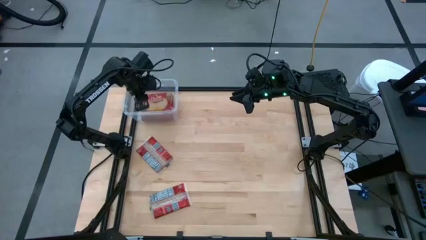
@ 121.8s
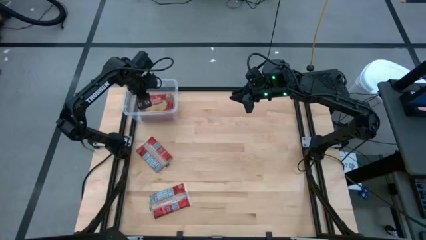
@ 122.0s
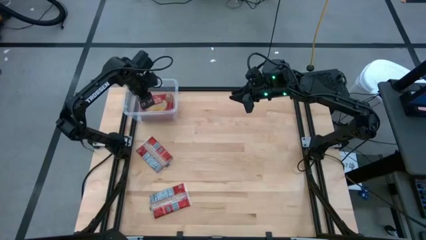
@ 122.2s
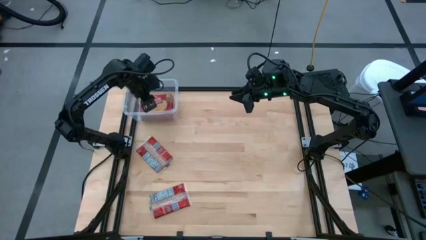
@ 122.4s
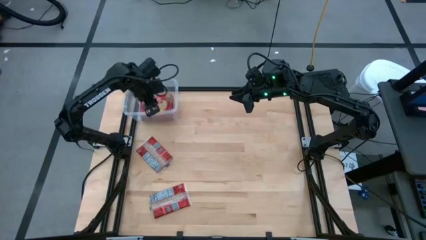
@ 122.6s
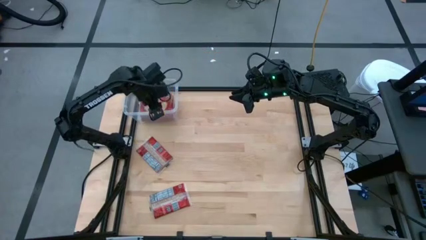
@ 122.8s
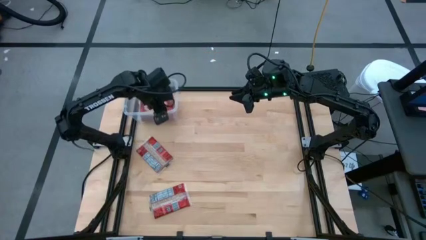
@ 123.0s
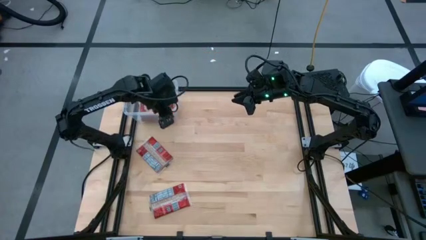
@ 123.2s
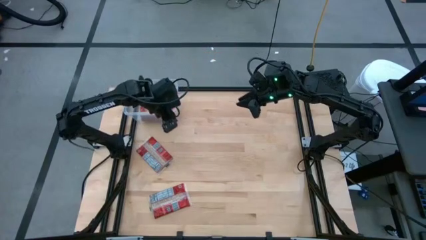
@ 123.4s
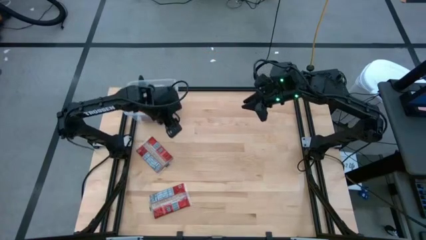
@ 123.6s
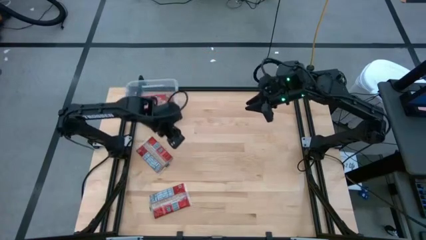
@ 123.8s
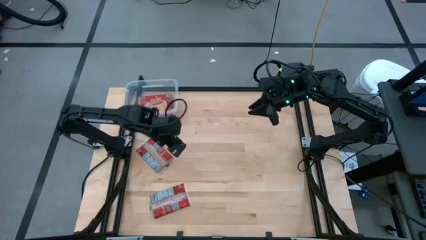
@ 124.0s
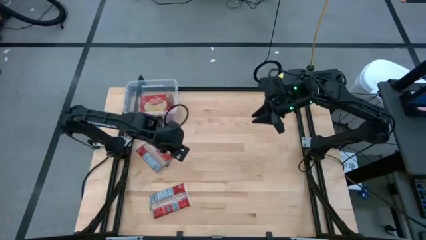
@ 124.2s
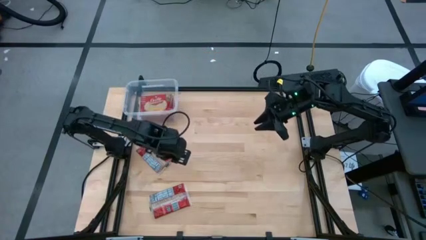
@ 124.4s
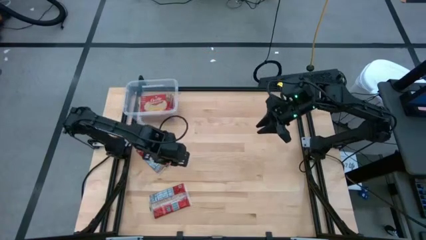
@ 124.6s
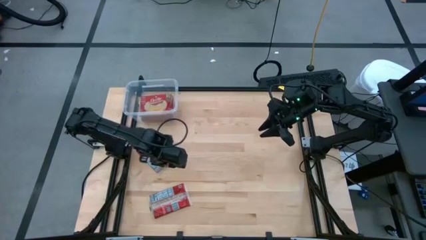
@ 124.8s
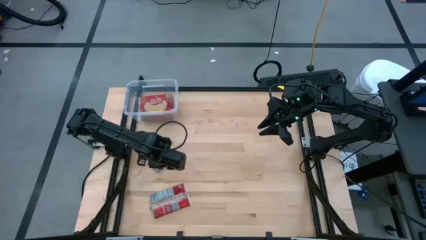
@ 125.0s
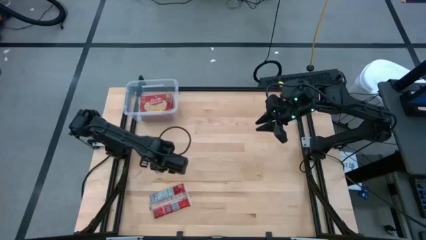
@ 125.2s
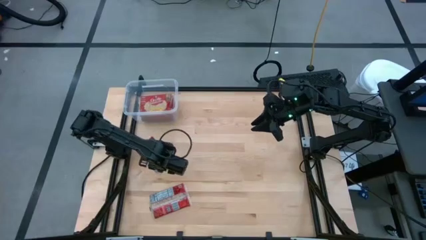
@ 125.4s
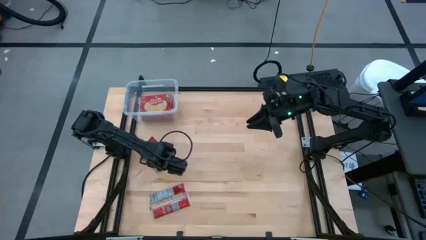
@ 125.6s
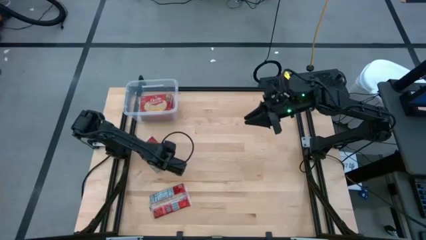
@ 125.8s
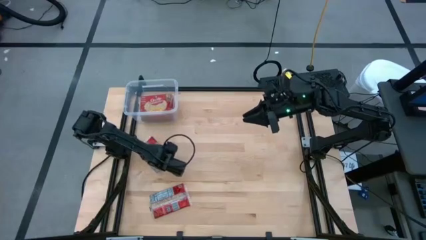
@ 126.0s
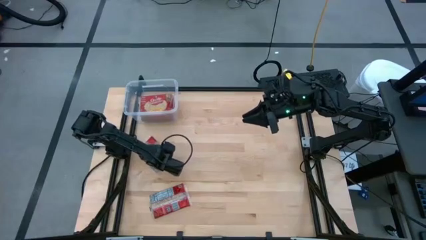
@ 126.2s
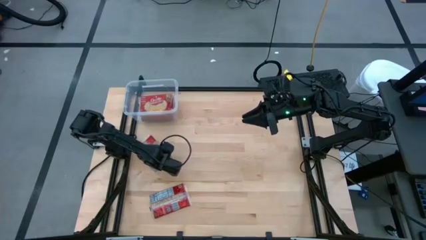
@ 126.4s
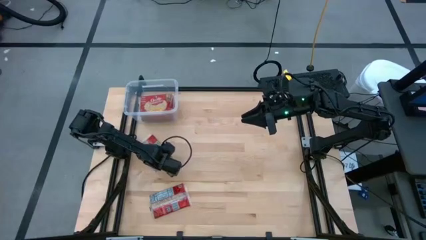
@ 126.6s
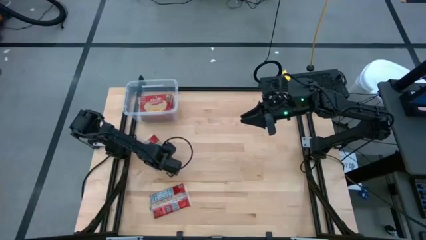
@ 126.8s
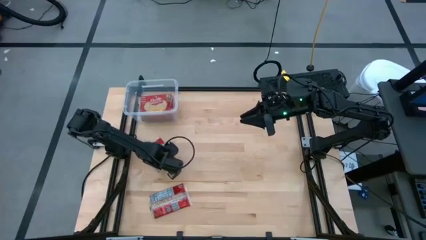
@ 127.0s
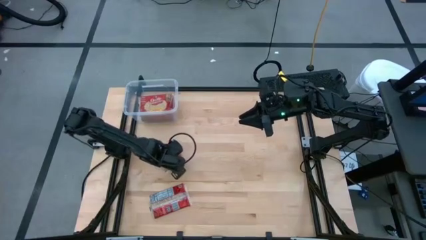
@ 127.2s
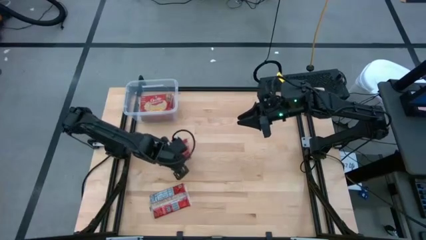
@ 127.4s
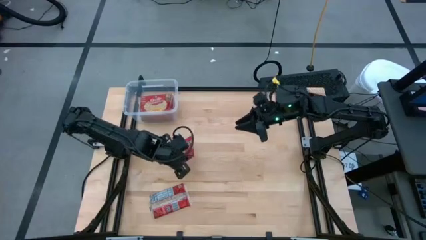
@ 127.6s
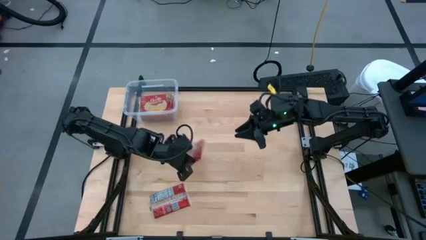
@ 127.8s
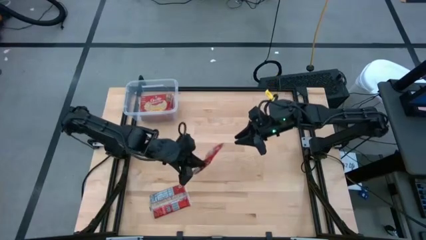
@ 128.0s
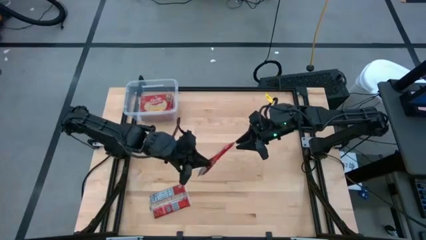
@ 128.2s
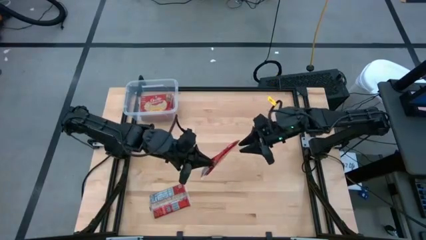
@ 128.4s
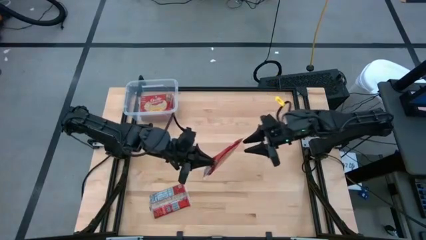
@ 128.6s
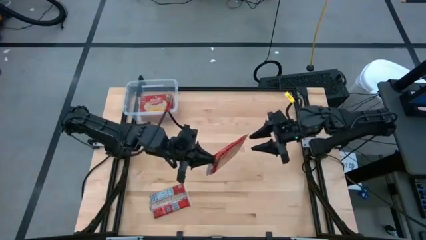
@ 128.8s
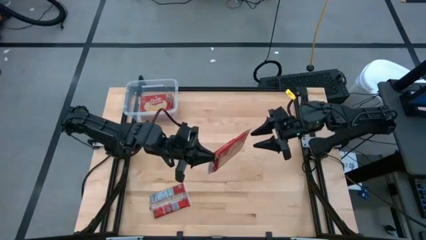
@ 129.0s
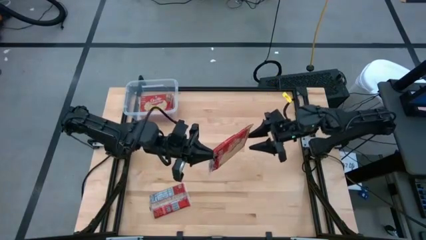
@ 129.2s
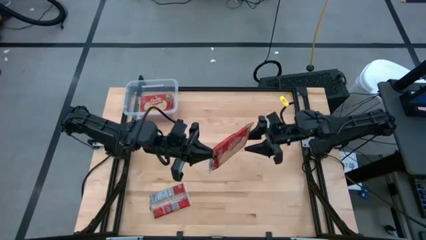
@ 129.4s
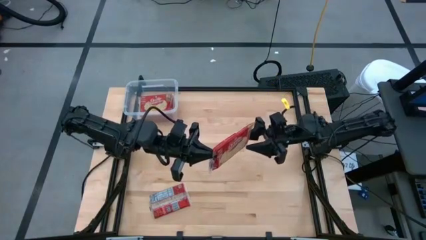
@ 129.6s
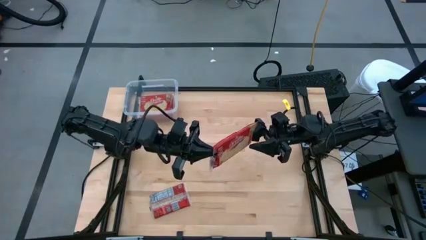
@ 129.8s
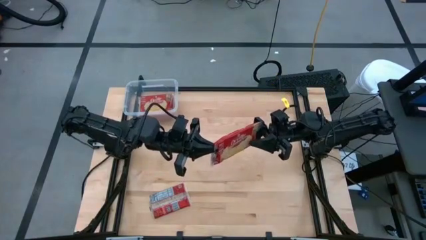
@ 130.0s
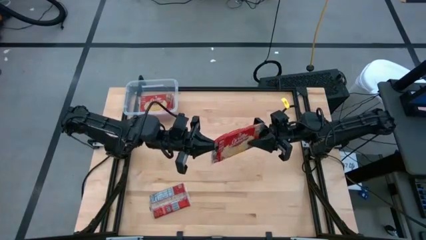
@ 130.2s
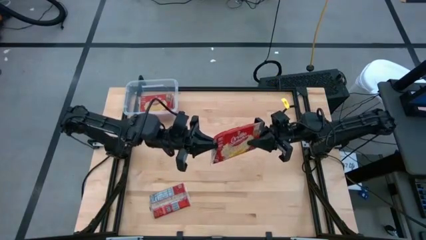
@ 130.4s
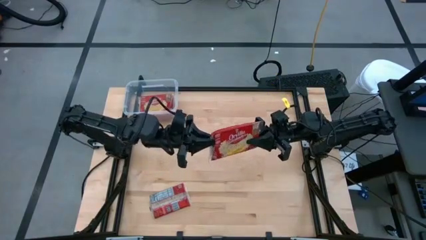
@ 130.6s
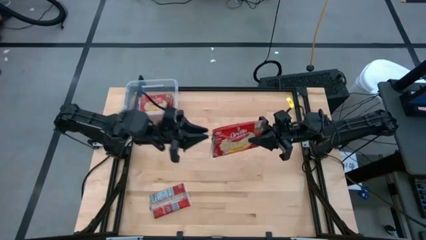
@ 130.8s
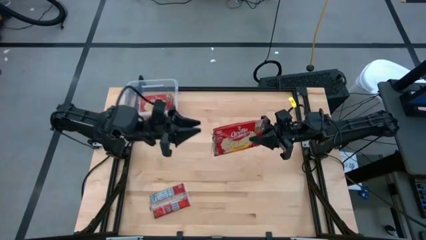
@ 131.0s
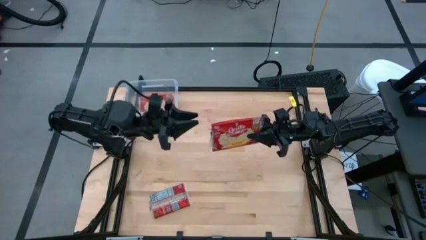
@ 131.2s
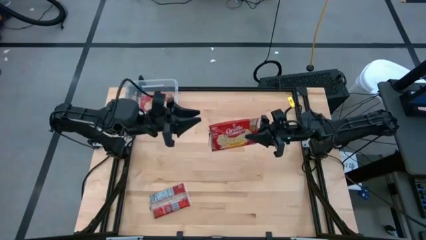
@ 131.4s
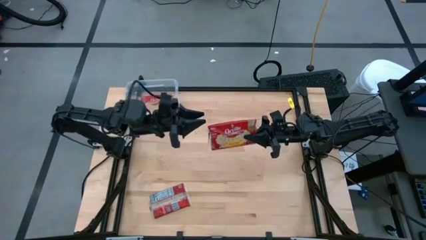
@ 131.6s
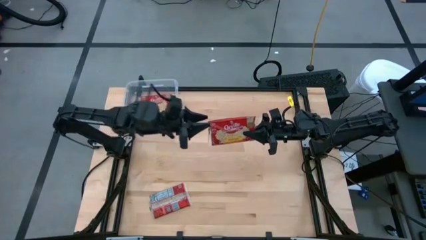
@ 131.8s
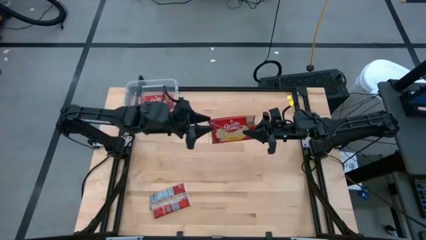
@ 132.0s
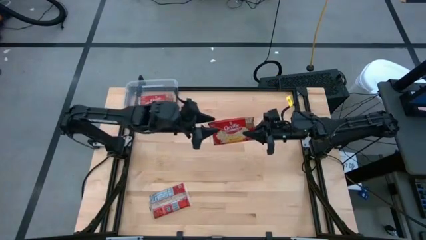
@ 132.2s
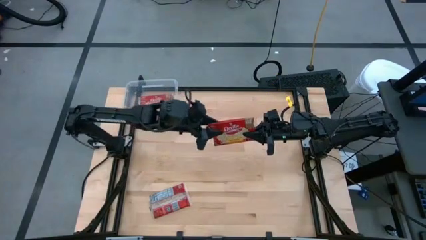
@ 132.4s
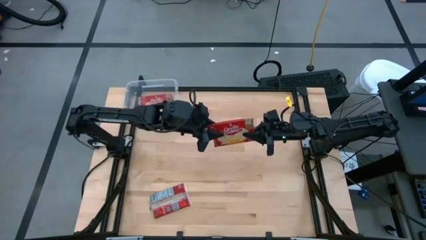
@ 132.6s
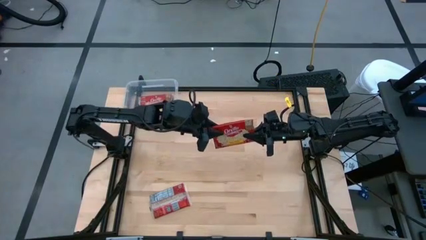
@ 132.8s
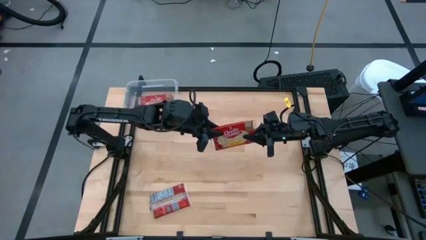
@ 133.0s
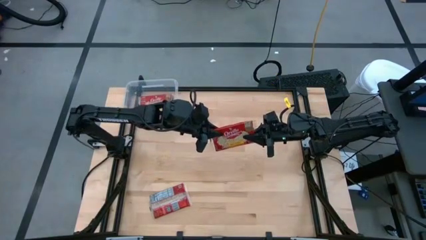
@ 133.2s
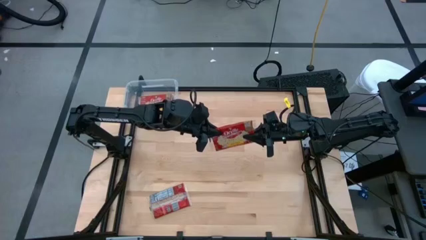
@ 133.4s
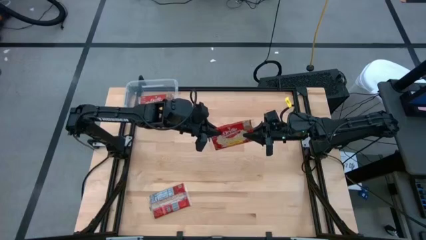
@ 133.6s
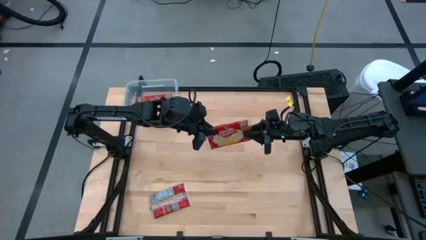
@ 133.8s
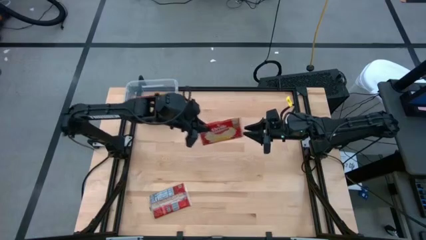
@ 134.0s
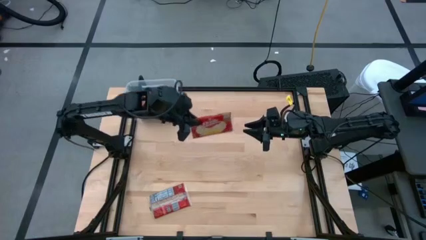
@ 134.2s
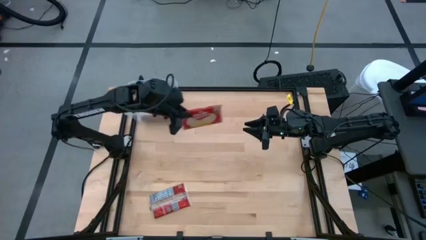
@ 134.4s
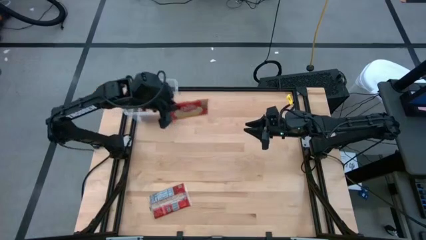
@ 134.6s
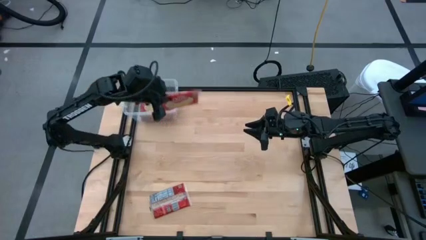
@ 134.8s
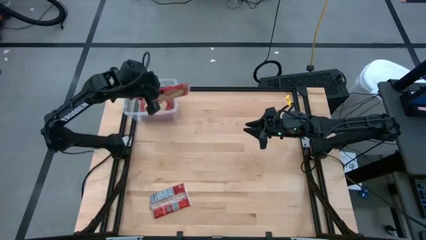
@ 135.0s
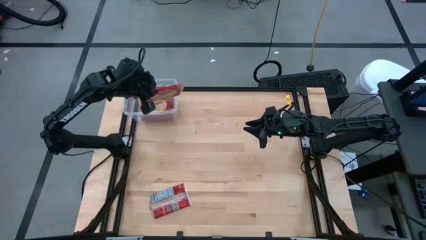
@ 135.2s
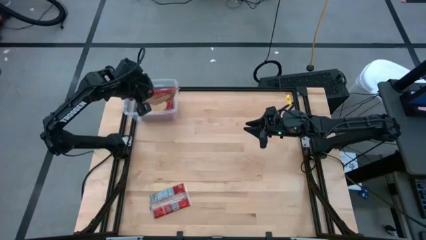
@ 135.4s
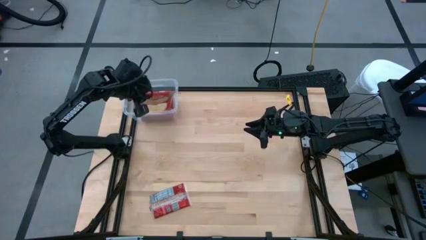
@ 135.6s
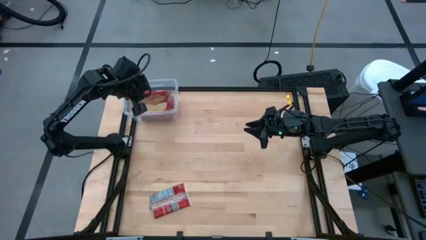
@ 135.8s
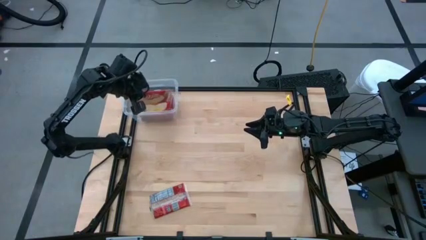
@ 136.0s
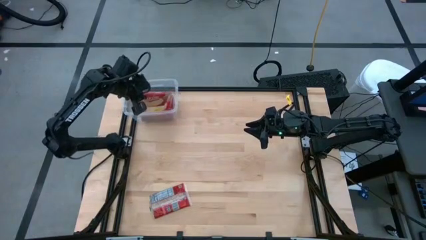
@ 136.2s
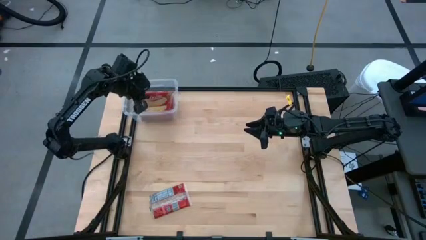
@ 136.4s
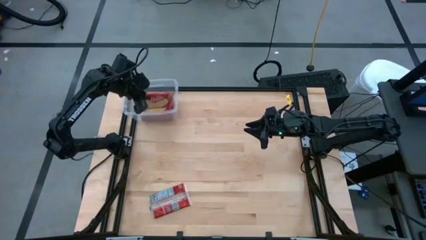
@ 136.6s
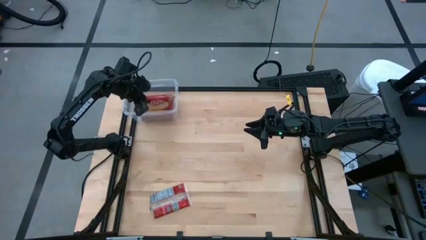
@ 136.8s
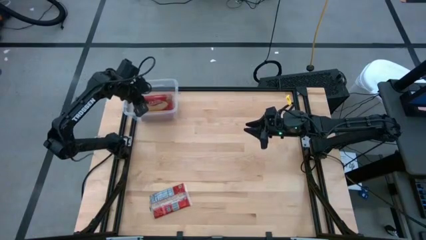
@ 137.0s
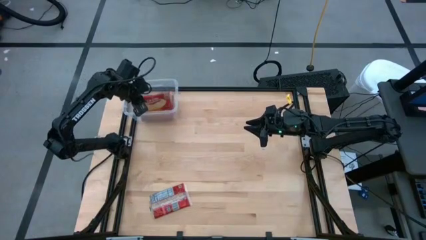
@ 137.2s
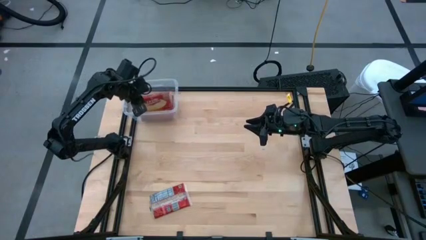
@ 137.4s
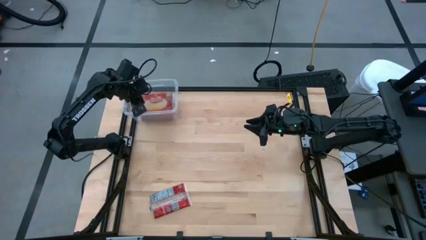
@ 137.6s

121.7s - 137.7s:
Task: Sort popcorn bags into baskets
Put the popcorn pack into the transparent bin
